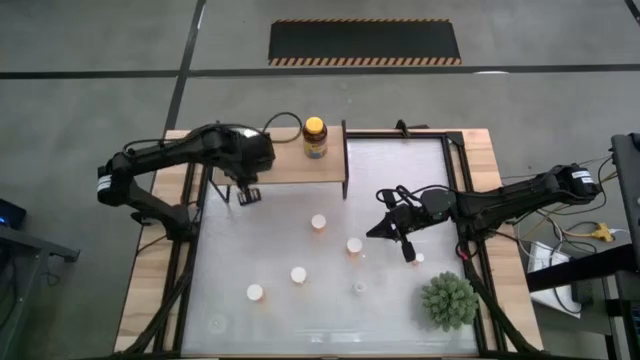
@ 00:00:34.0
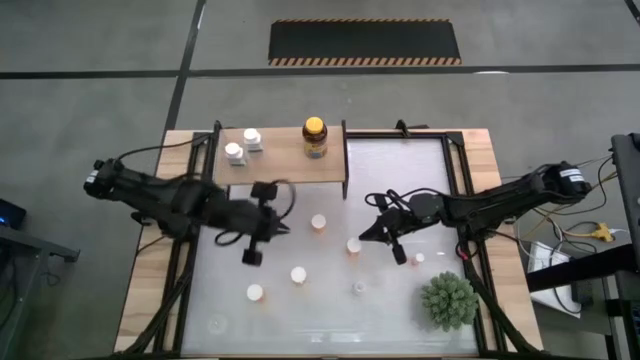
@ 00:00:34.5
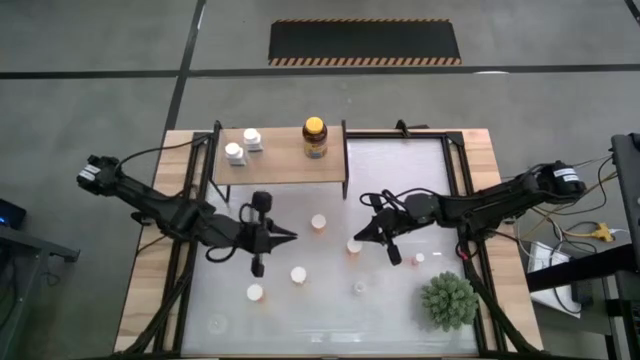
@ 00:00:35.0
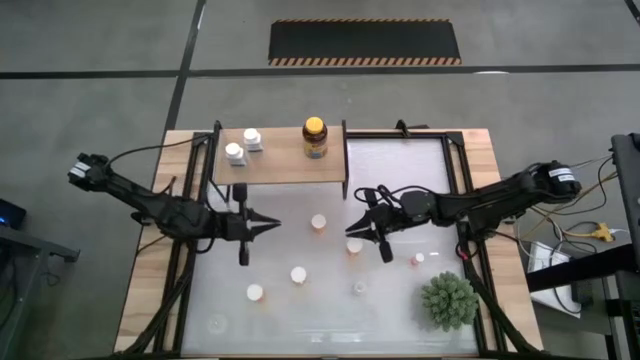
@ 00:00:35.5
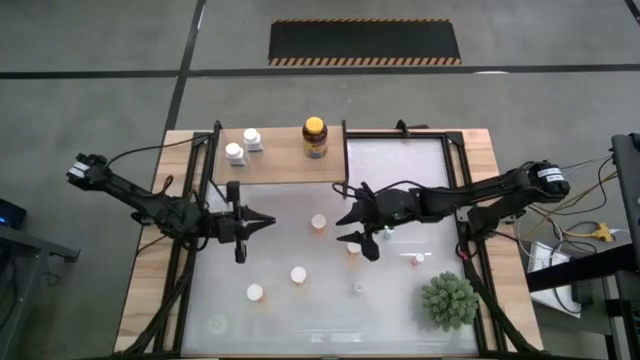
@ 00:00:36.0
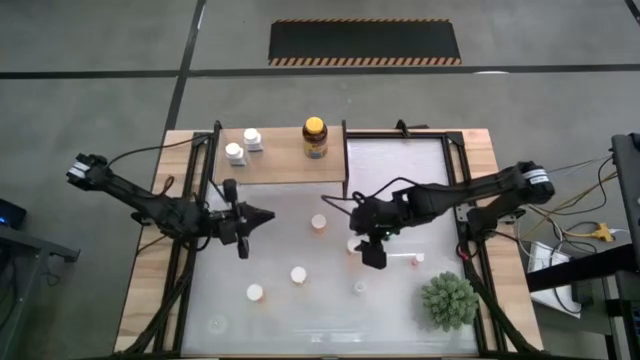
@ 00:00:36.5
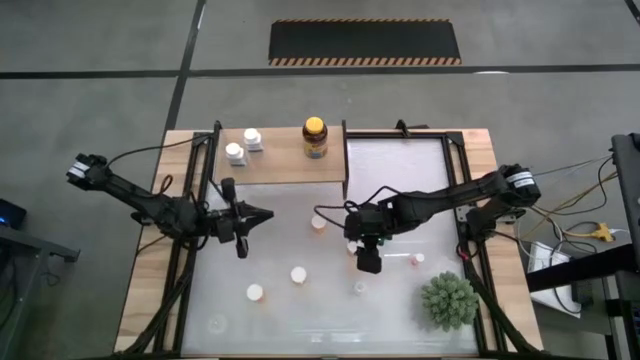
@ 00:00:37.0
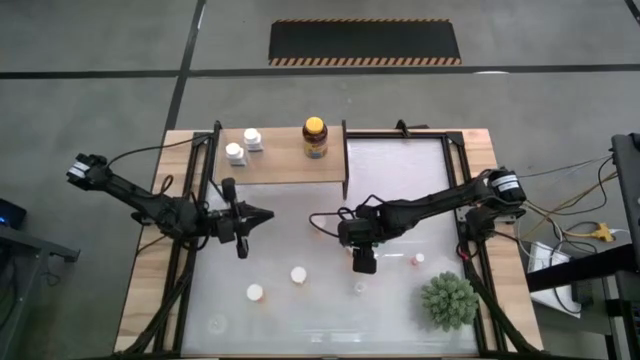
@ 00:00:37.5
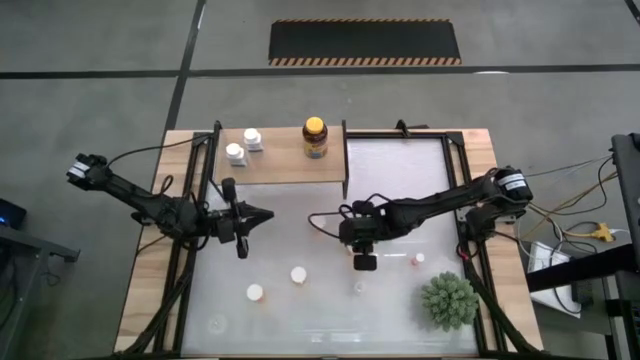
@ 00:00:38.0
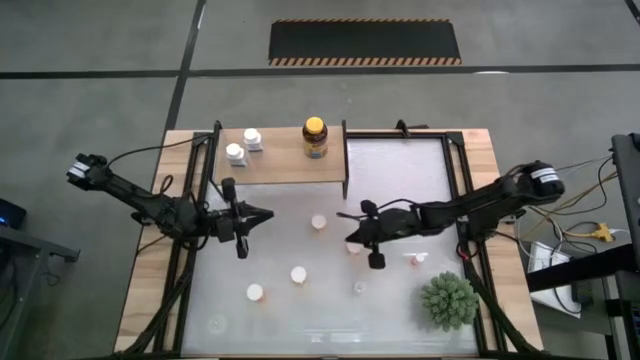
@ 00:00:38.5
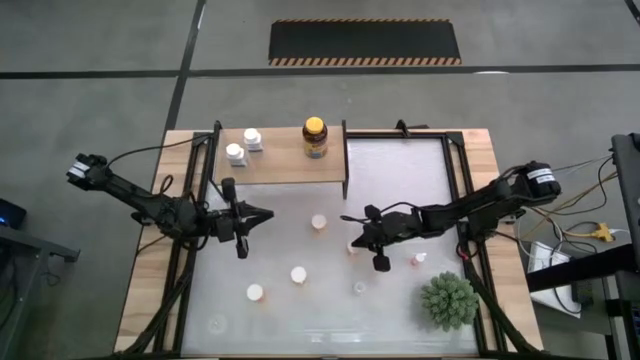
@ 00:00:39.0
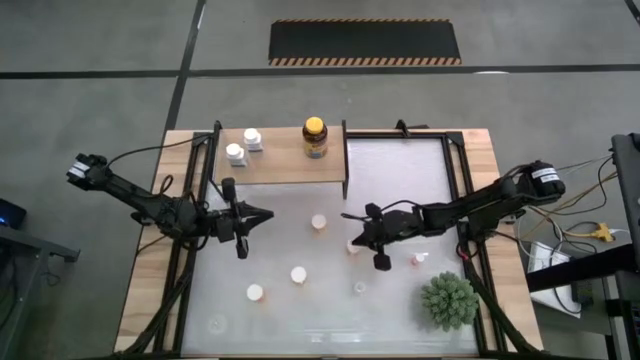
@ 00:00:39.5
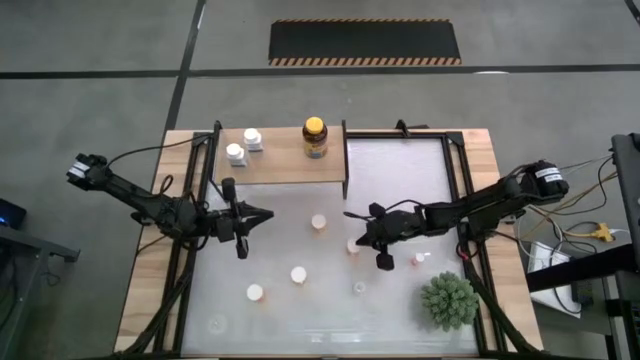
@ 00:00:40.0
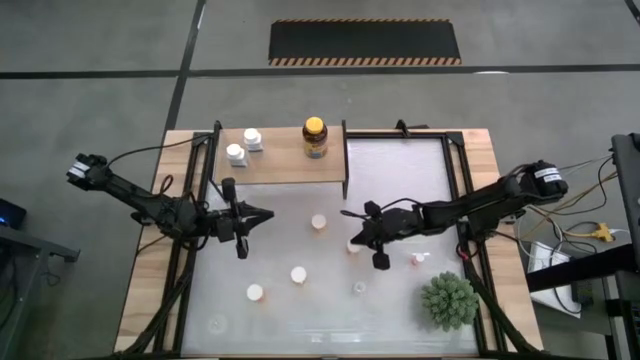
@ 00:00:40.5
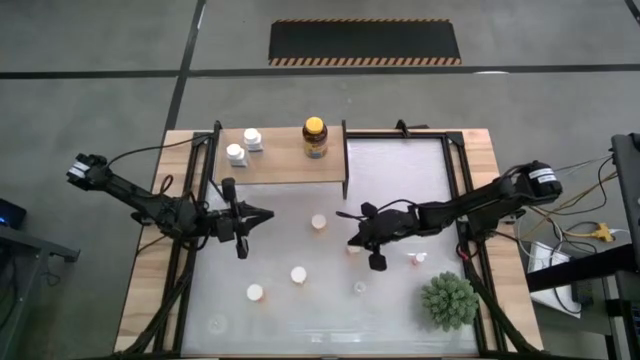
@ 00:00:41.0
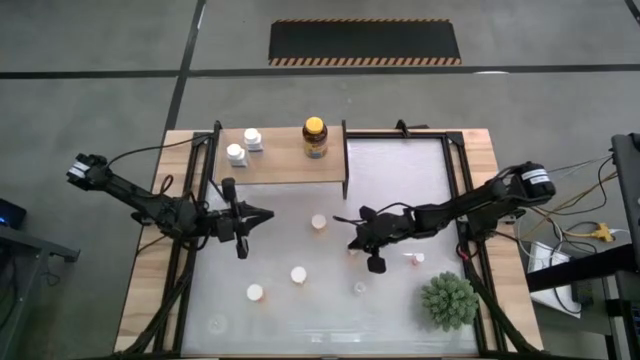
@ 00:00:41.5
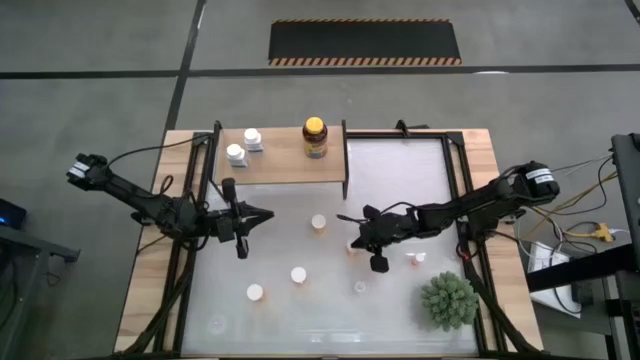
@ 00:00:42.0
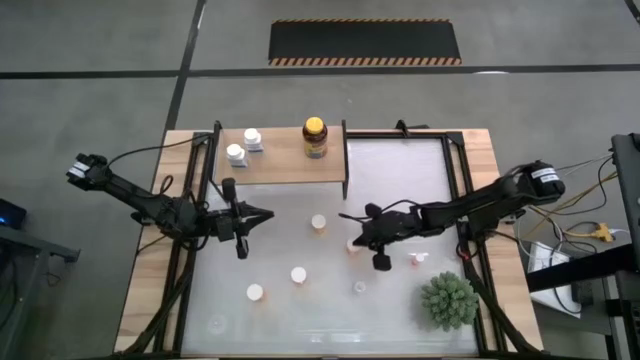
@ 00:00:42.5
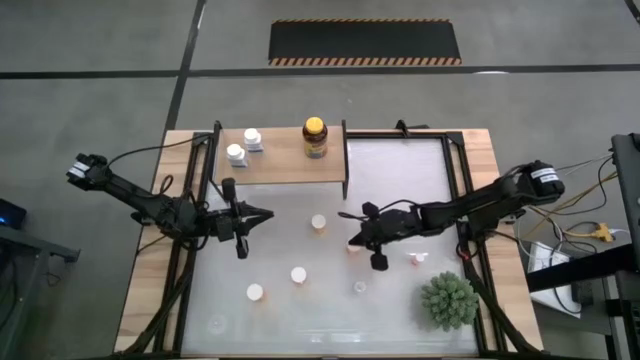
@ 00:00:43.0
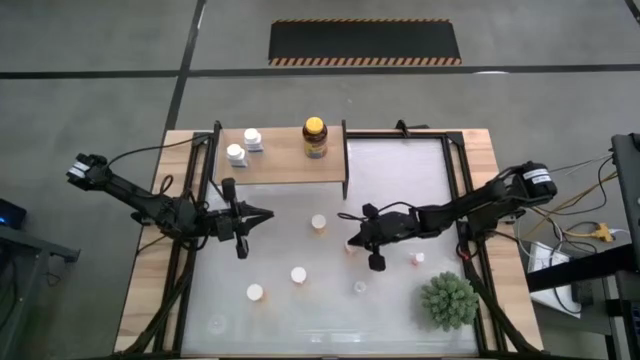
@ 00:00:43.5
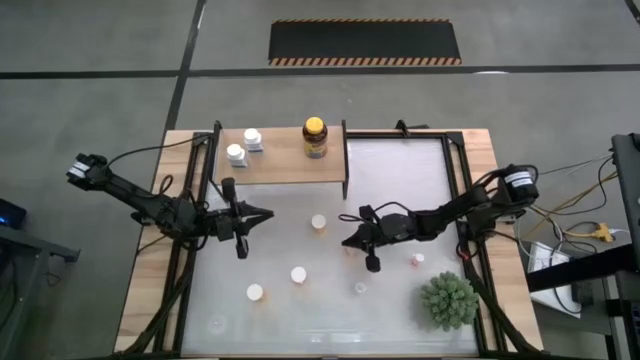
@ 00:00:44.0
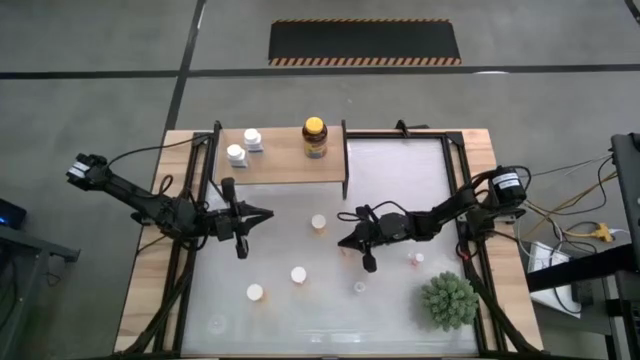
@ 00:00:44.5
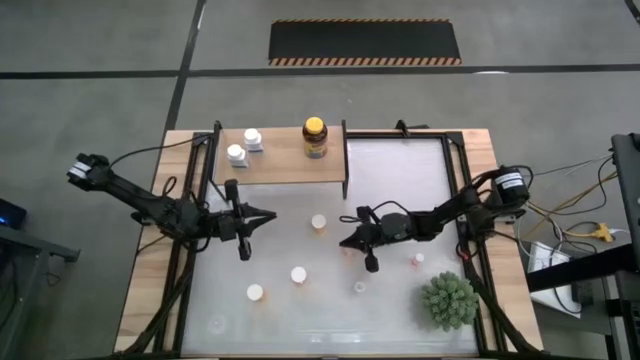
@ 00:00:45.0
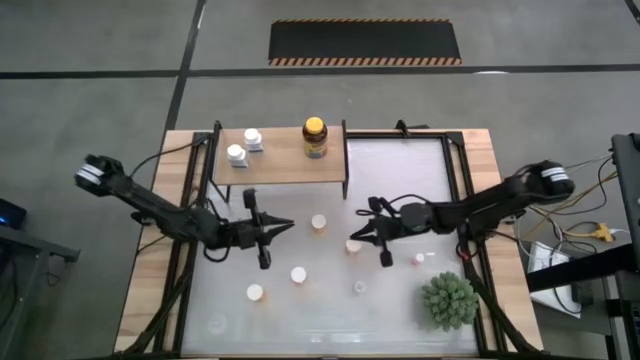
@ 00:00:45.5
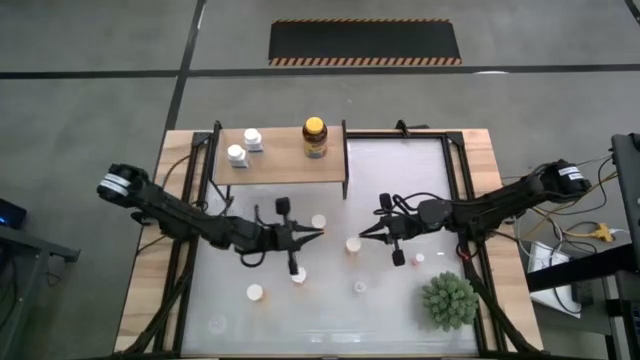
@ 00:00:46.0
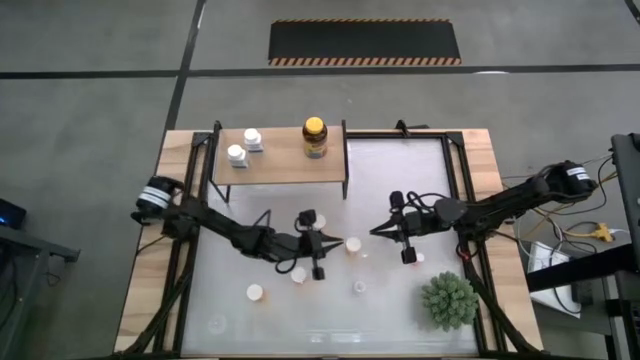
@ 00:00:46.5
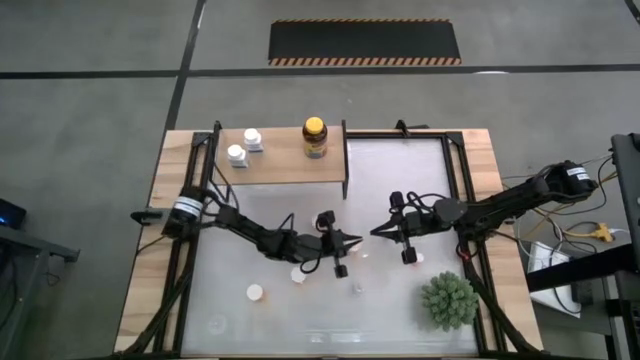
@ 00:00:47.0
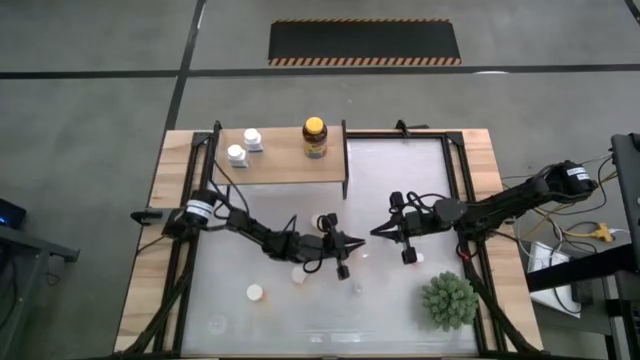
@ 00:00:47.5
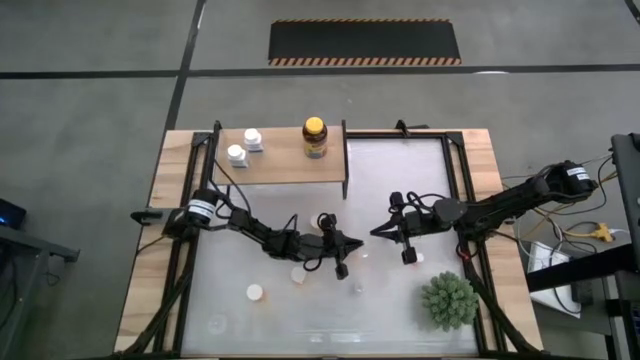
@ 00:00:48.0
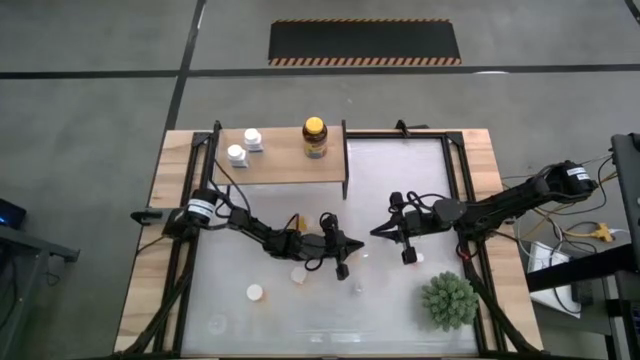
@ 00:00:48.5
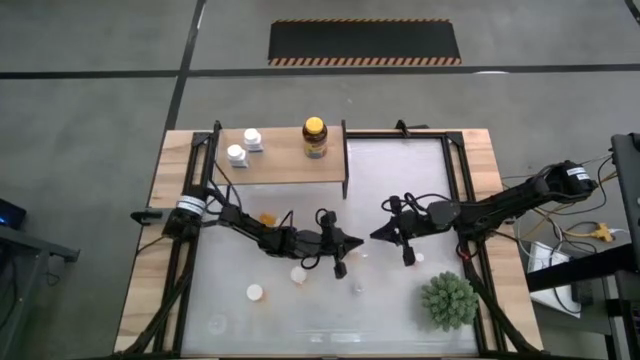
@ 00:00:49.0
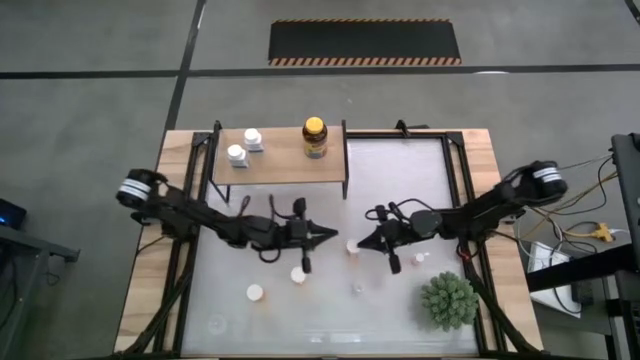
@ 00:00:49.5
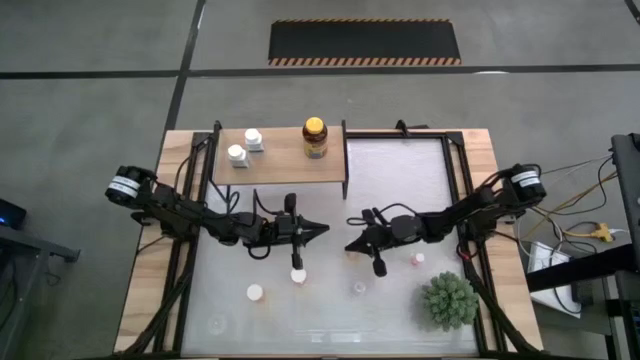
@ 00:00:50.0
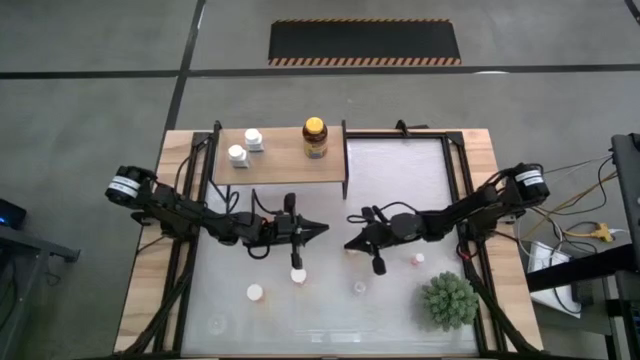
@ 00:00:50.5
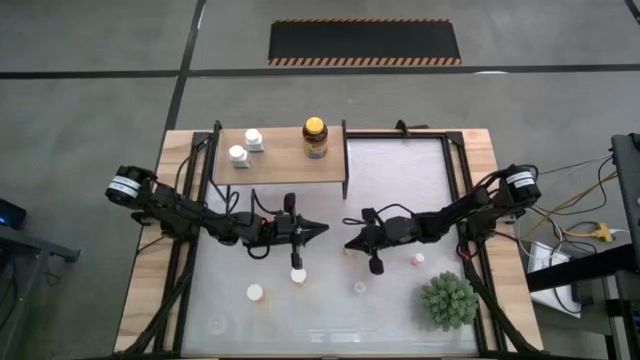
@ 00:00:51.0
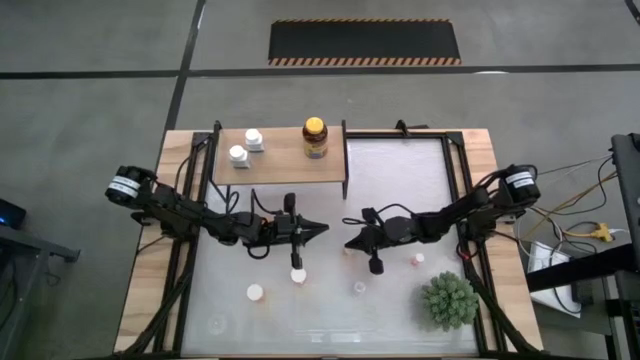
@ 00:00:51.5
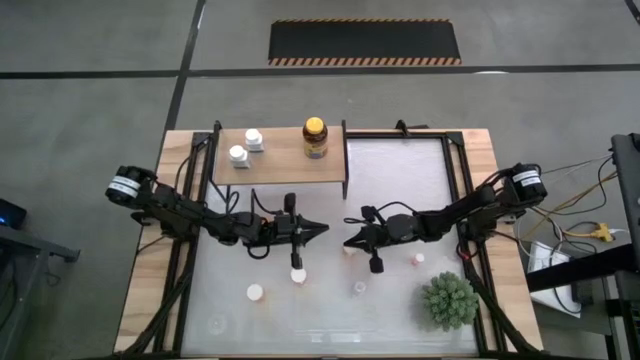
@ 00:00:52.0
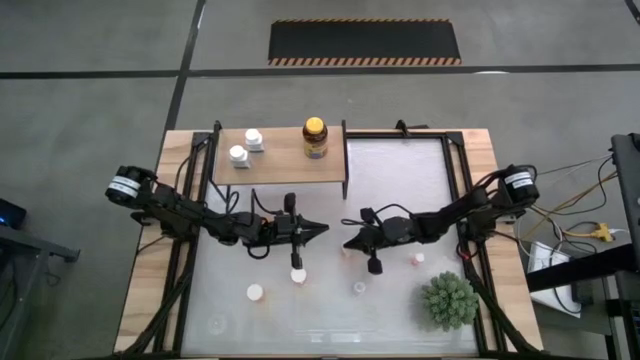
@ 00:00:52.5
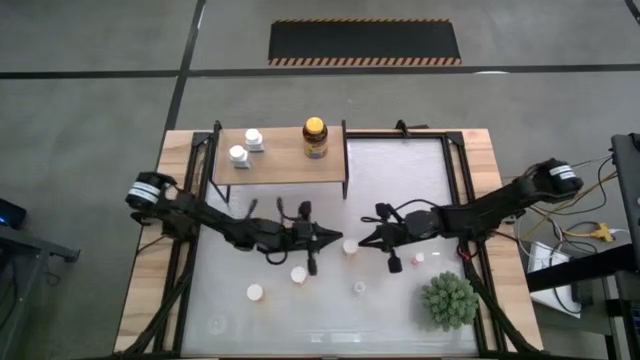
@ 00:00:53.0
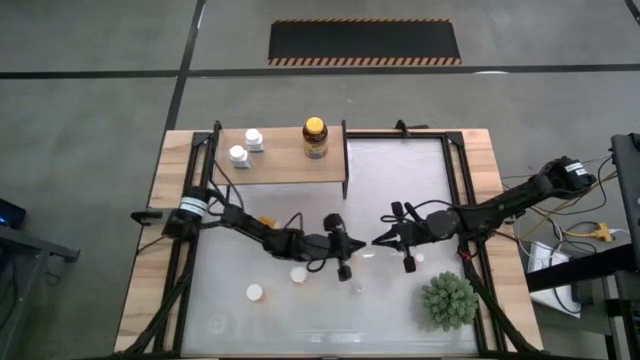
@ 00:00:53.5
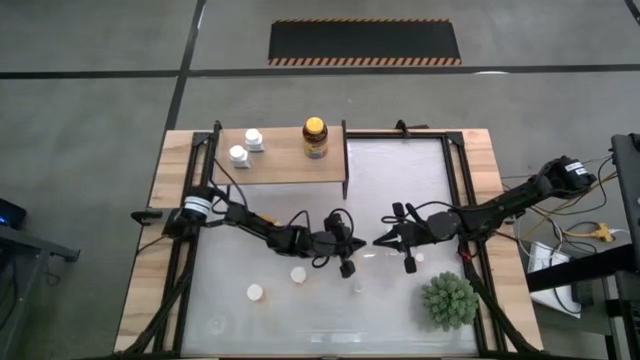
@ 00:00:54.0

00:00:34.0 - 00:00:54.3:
Task: Pick and place medicine bottles onto shelf by color
Adjust the lid of the orange pill bottle
